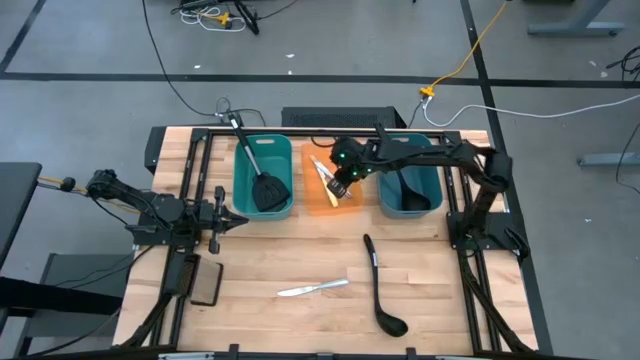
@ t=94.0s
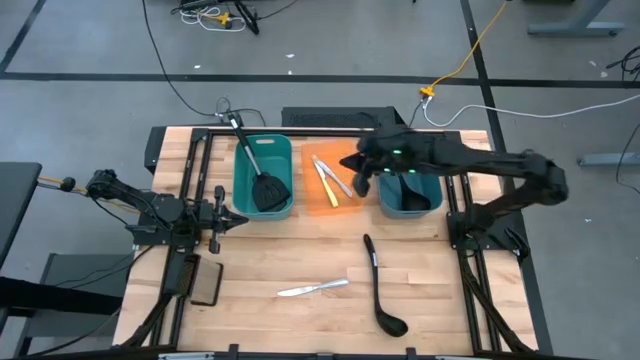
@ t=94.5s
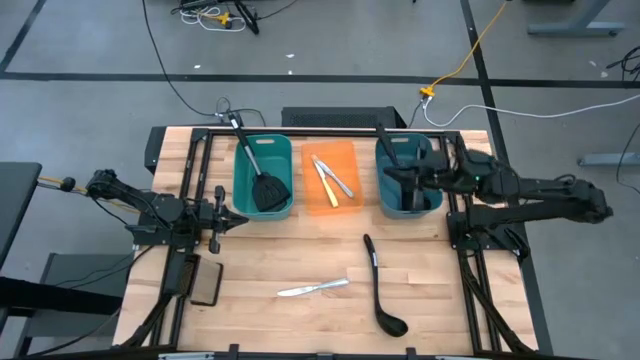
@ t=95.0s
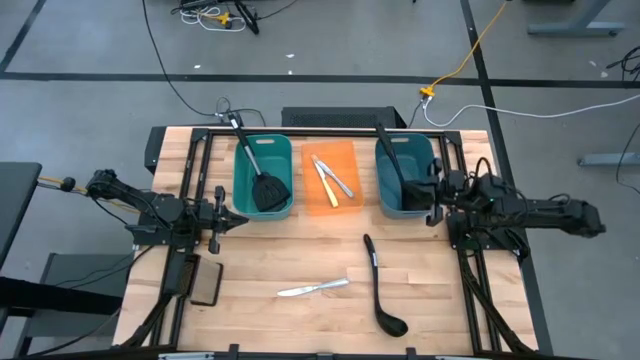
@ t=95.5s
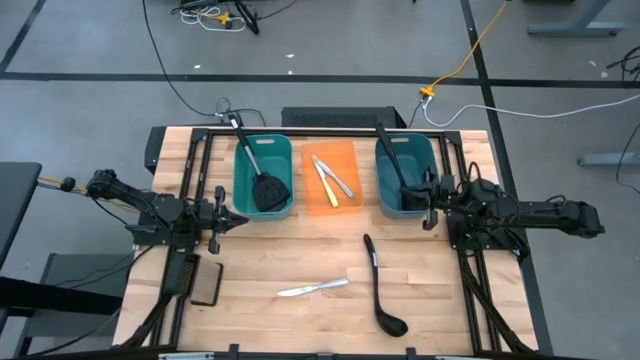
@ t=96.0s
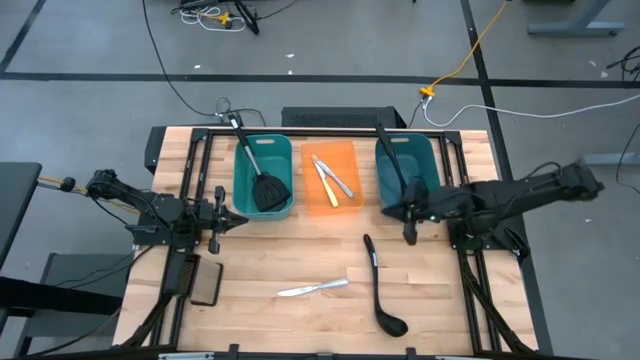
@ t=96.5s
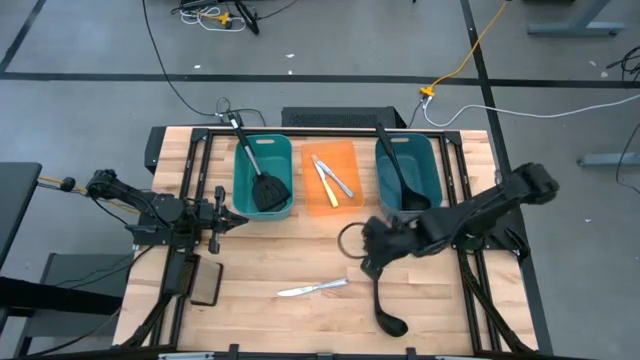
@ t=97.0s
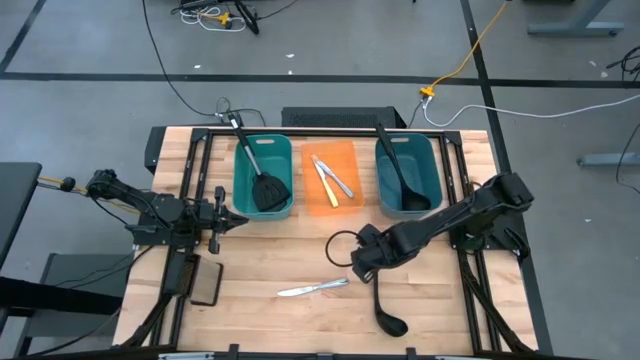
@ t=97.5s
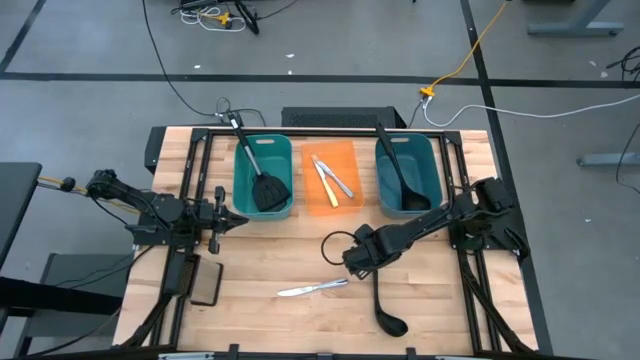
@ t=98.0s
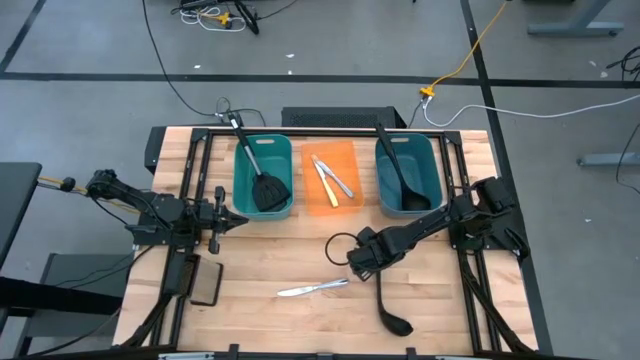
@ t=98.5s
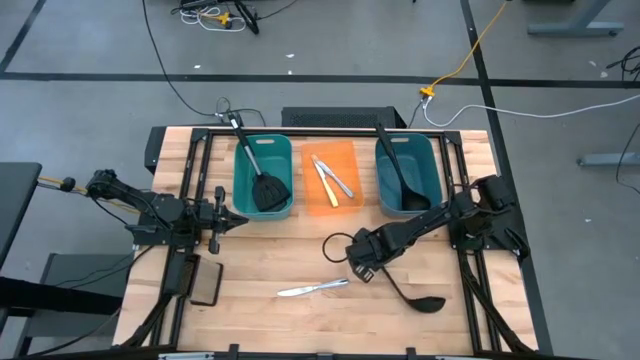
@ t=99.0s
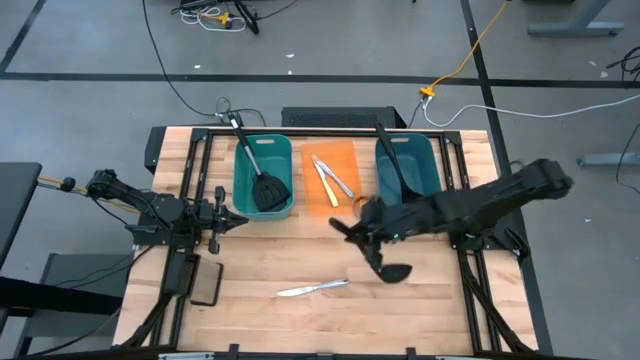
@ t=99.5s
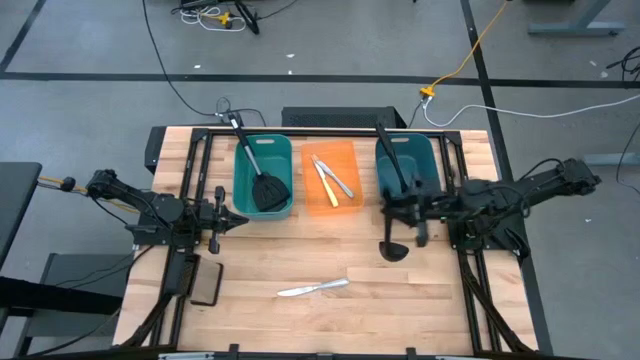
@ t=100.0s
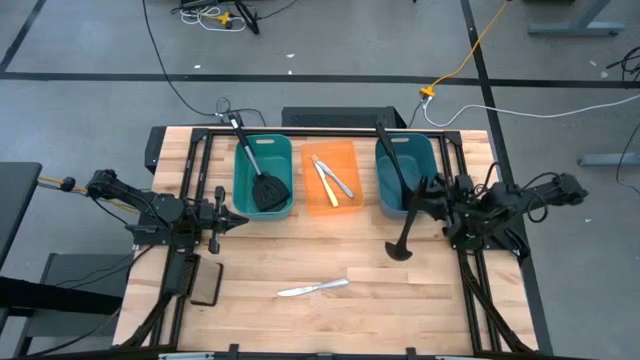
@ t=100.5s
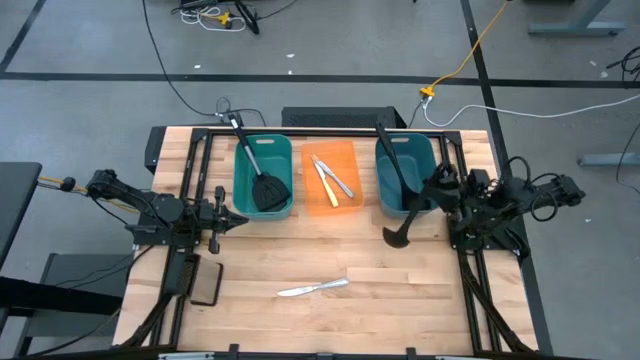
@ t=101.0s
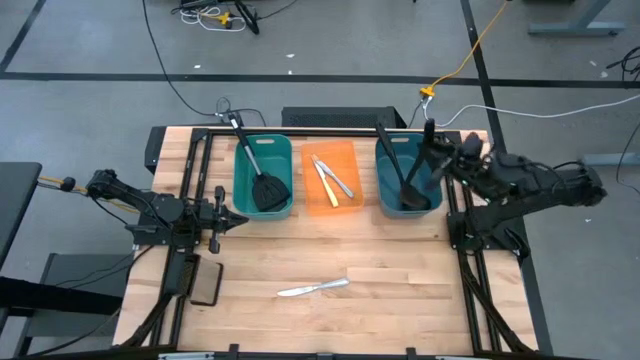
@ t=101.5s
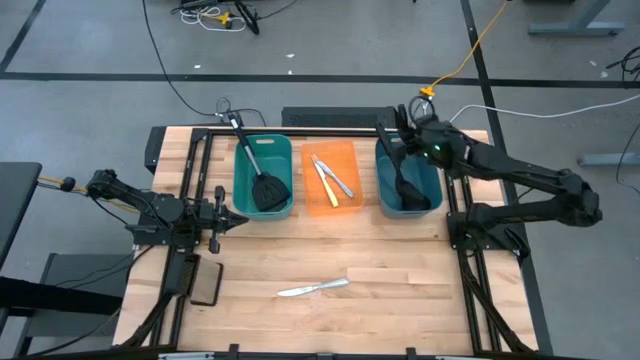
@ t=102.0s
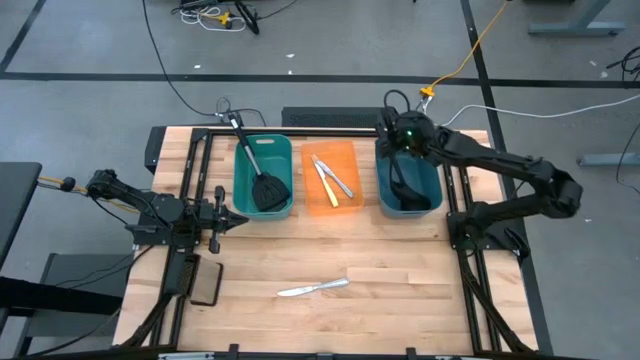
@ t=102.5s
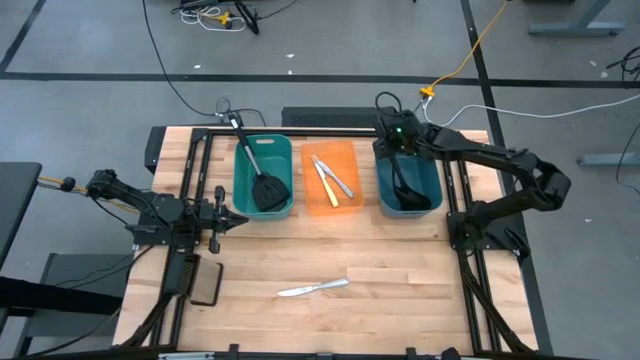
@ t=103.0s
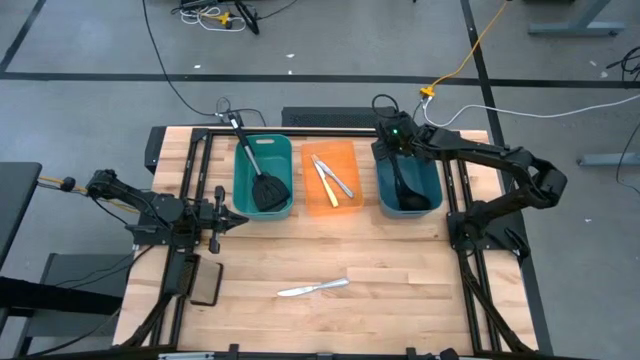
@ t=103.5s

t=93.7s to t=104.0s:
Task: Pick & Place Kitchen Items
Put the black spoon into the dark green bin

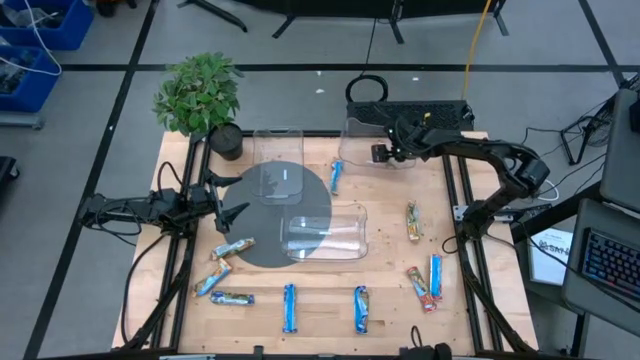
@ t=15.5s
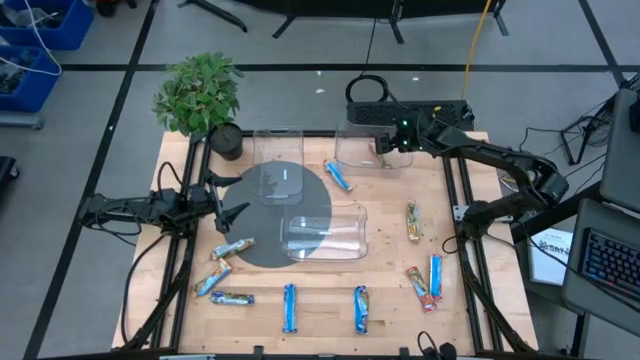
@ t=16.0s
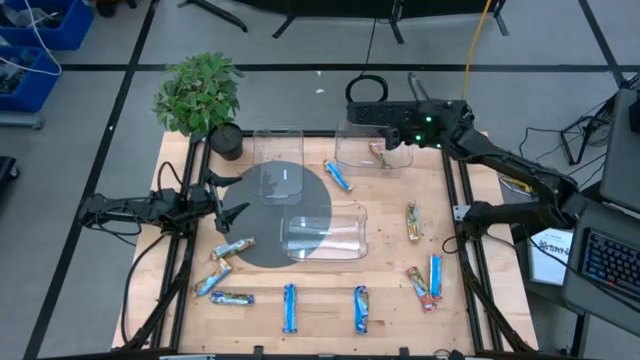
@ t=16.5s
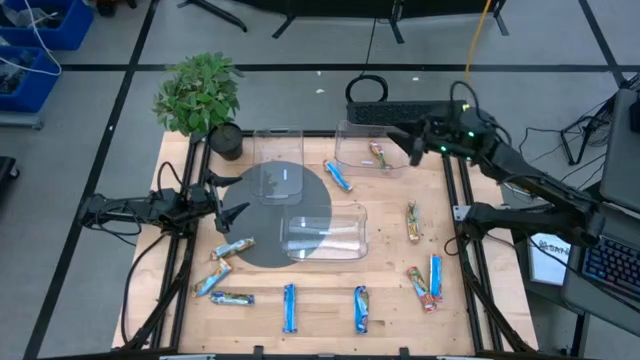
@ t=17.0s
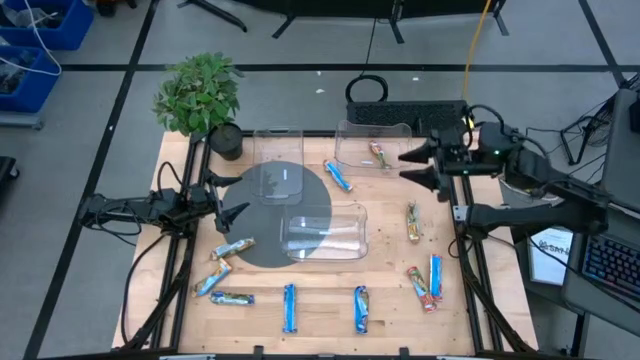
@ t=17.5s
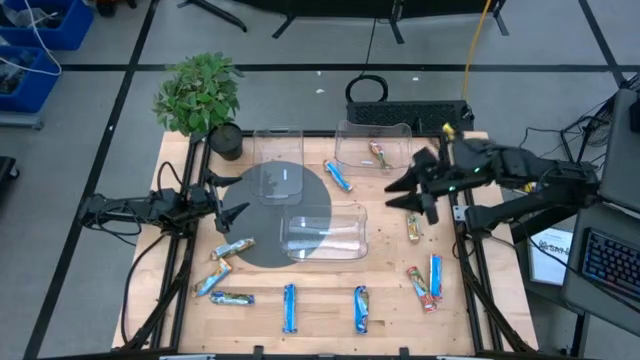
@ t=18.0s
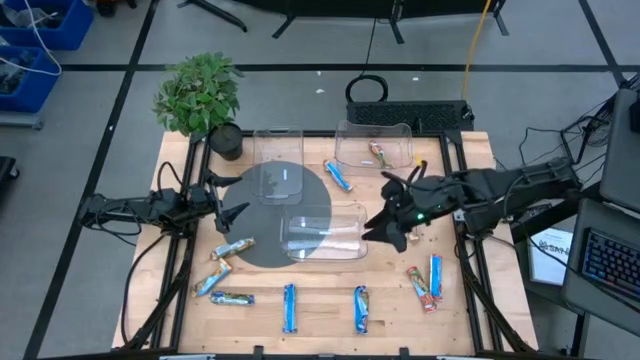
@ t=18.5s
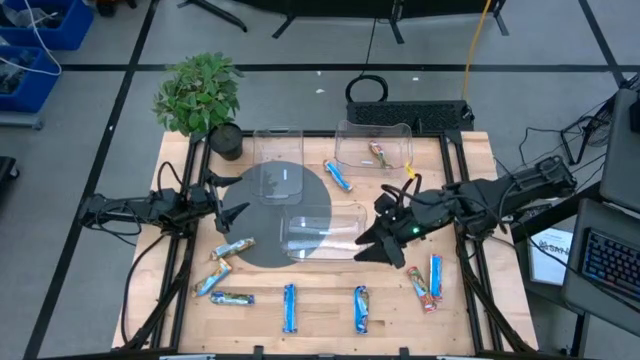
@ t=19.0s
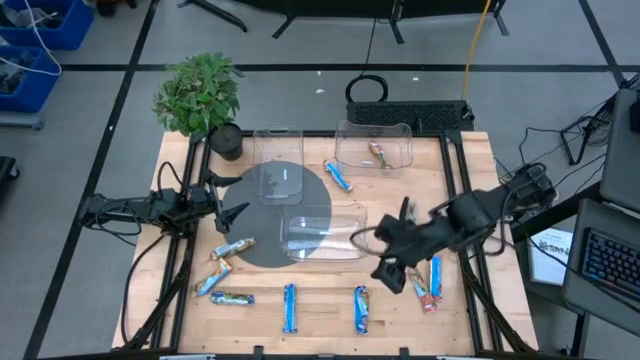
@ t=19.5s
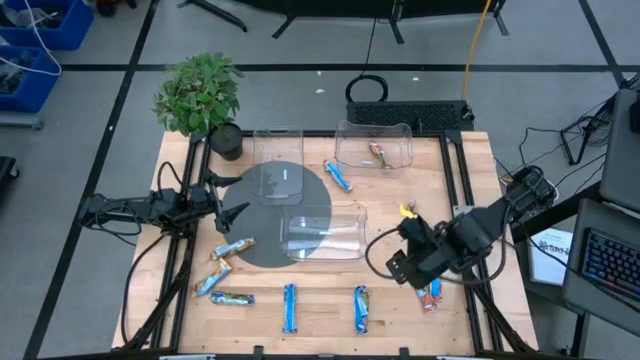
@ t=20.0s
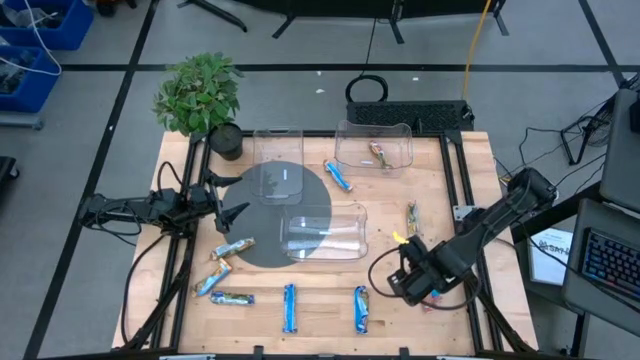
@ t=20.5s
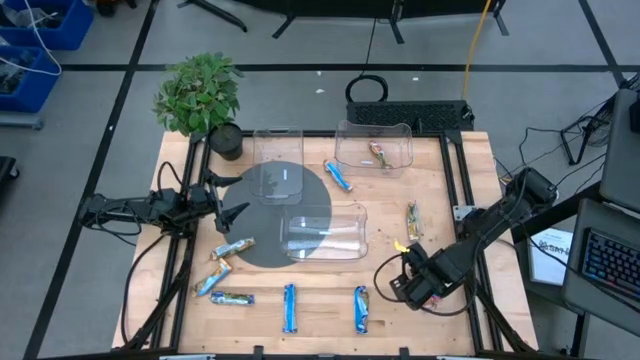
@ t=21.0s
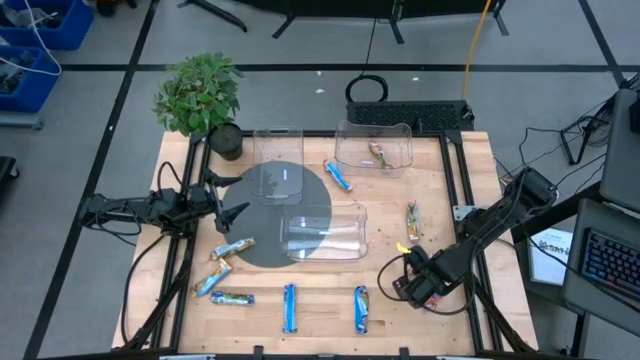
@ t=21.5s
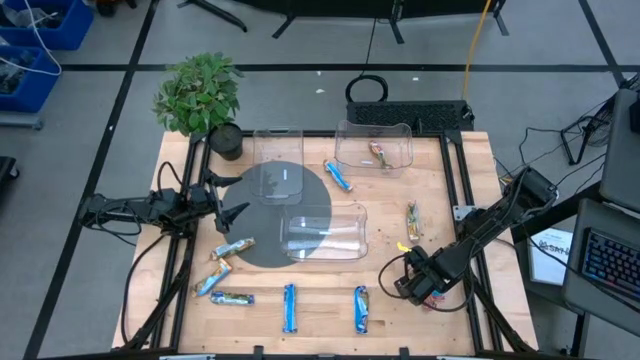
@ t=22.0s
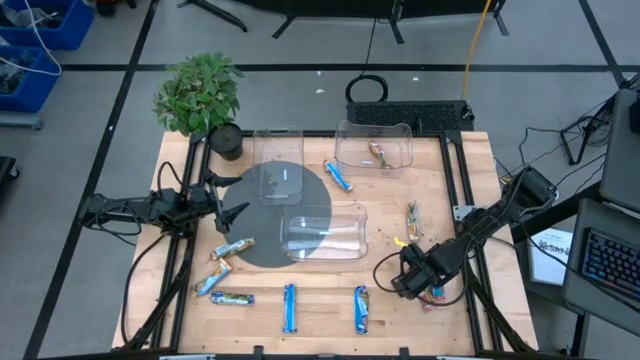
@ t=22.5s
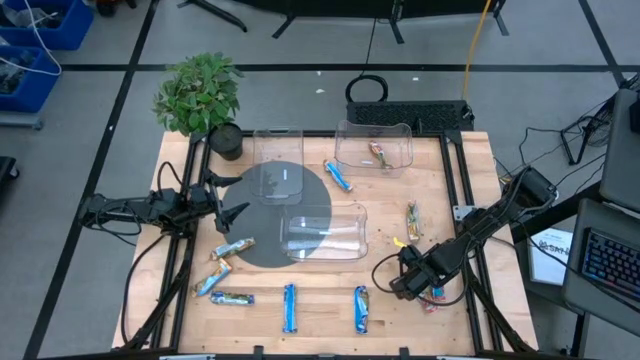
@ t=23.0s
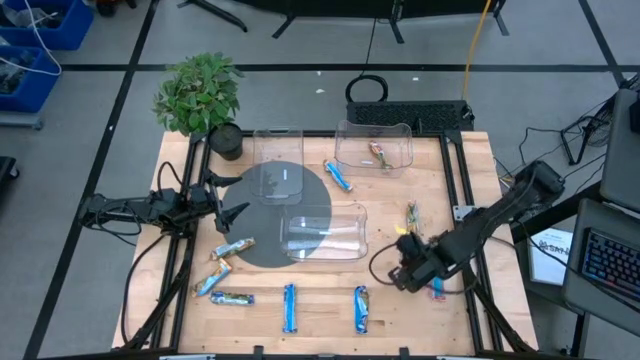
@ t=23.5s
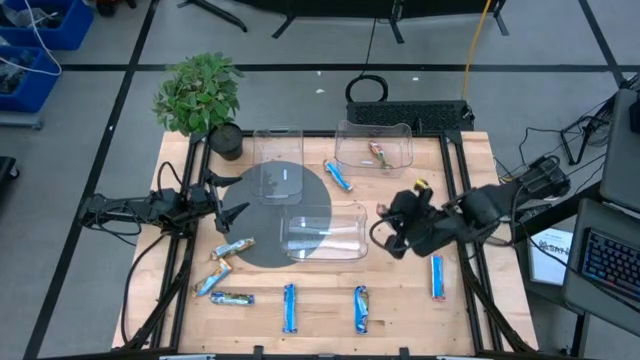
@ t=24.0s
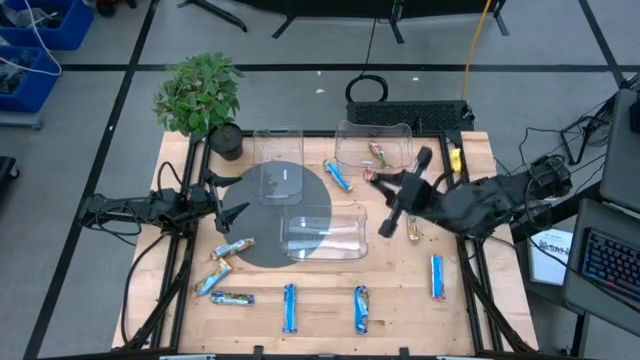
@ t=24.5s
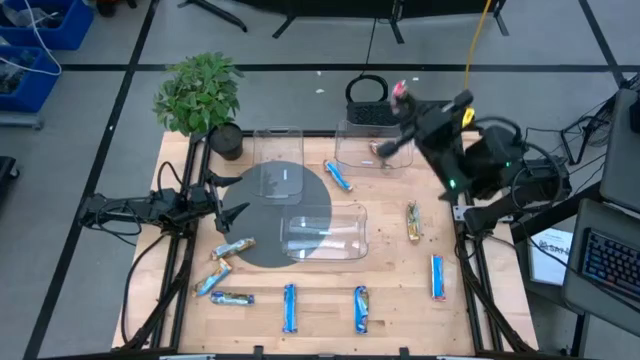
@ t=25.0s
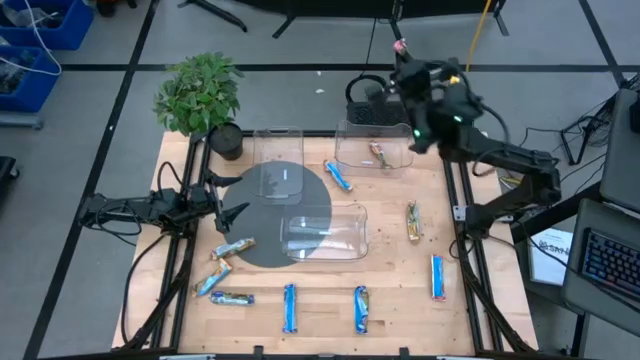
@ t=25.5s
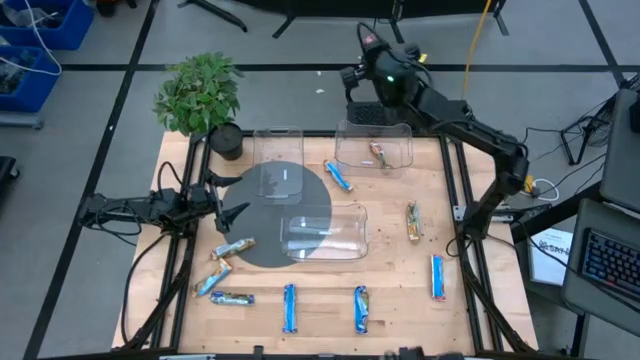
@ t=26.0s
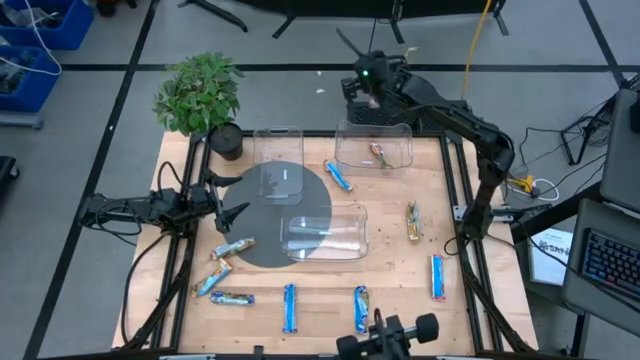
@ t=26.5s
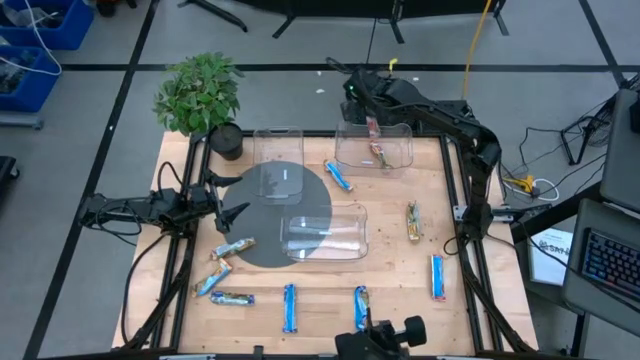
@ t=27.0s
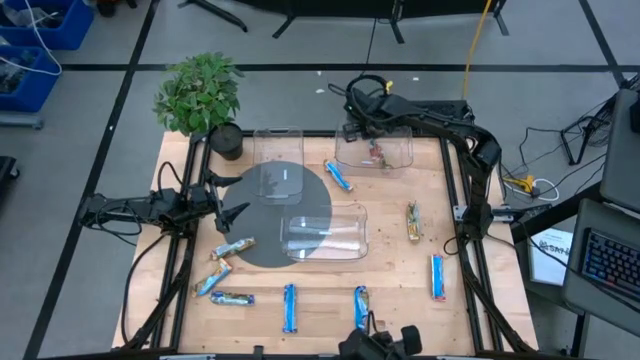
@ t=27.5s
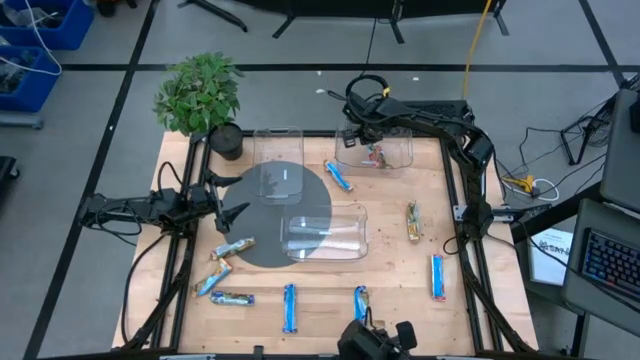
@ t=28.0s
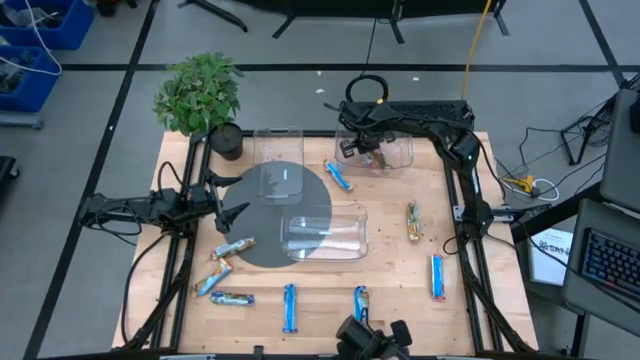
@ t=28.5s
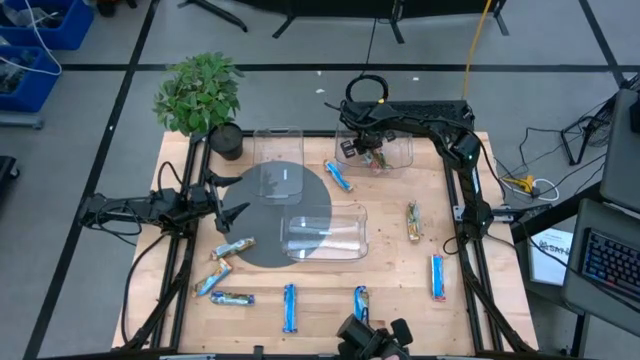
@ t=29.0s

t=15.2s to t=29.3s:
Task: Pick and place Granola Bars by type
Put the red granola bar into the top right transparent bin
